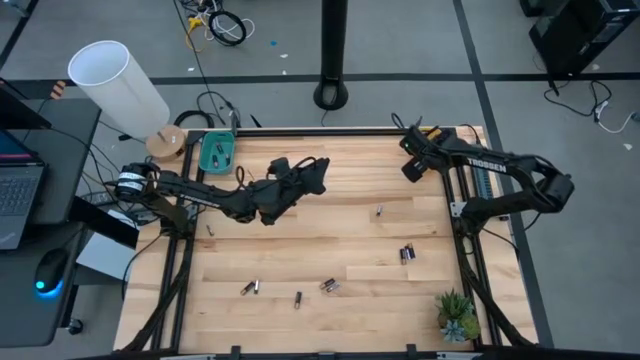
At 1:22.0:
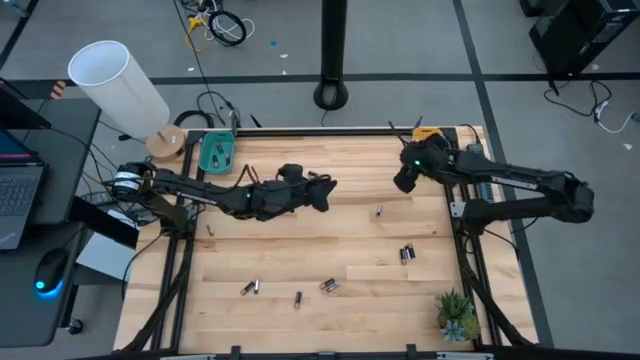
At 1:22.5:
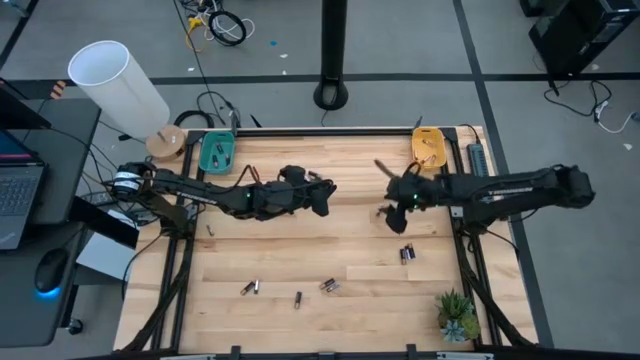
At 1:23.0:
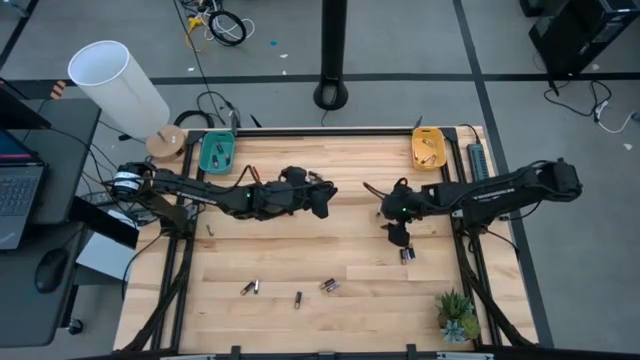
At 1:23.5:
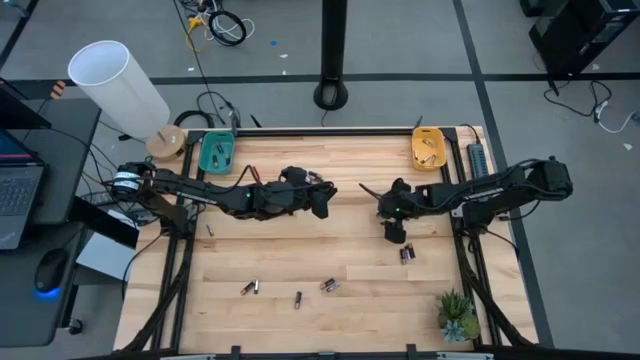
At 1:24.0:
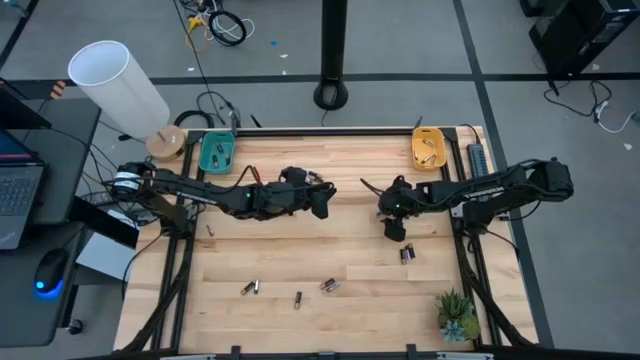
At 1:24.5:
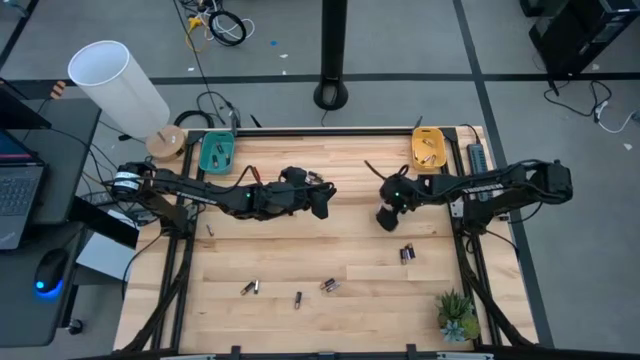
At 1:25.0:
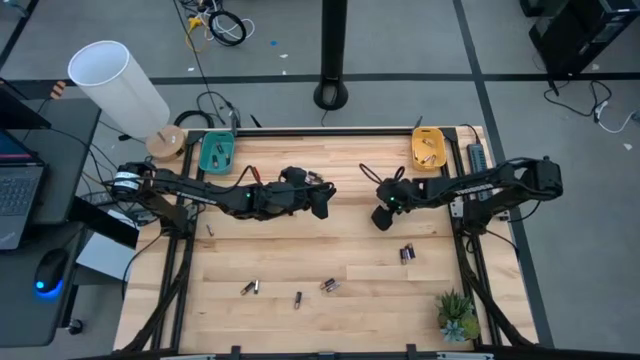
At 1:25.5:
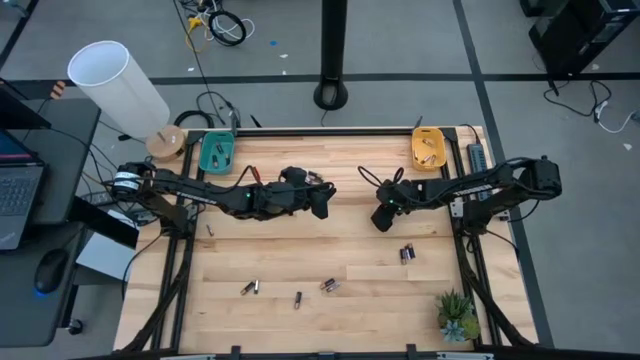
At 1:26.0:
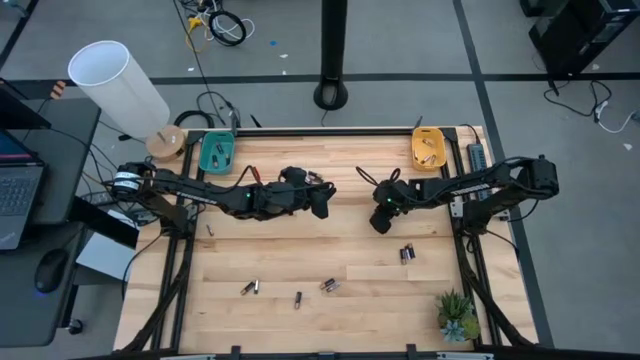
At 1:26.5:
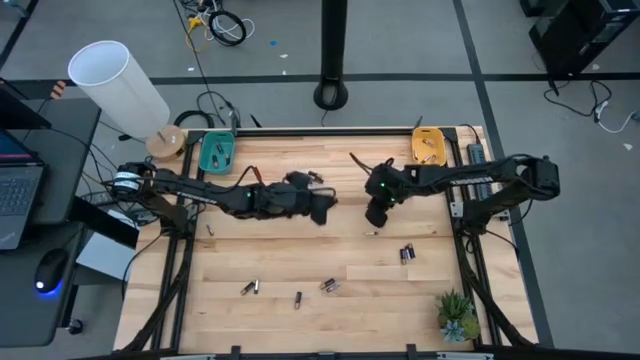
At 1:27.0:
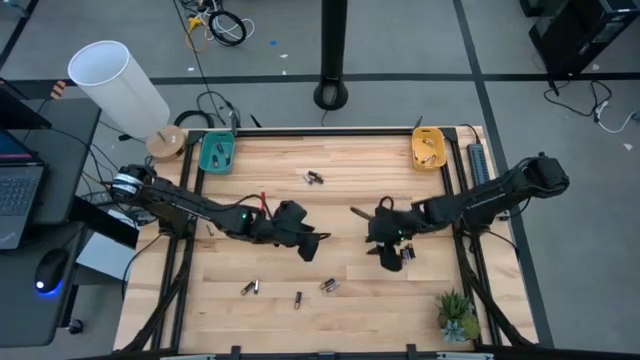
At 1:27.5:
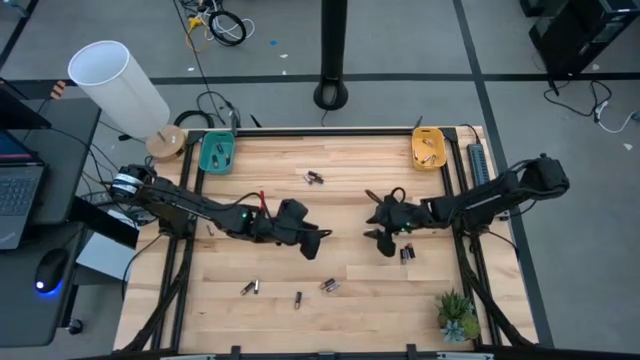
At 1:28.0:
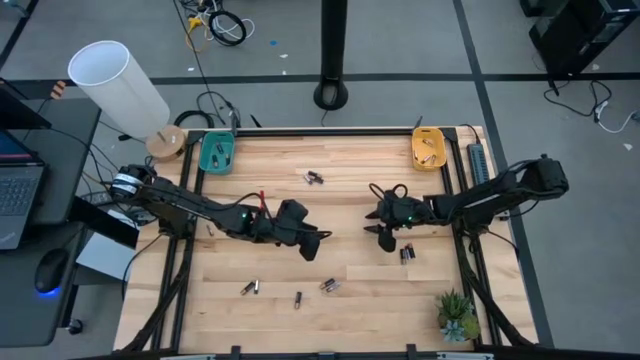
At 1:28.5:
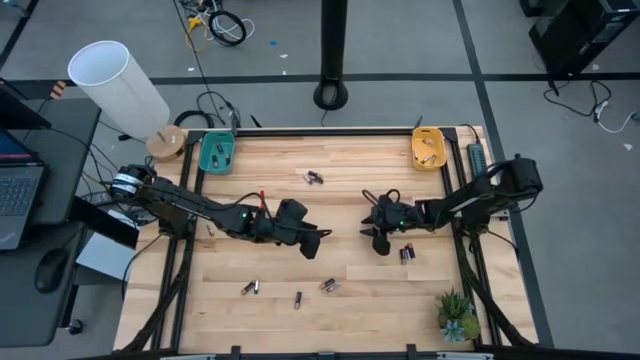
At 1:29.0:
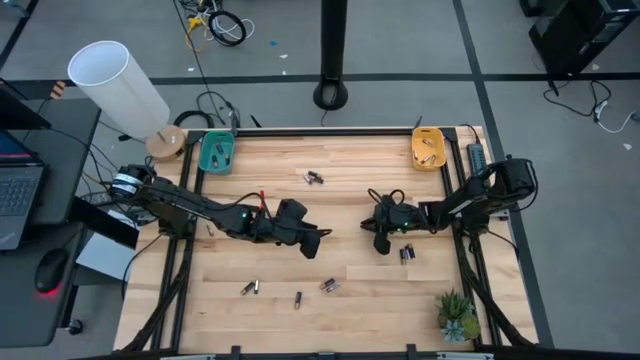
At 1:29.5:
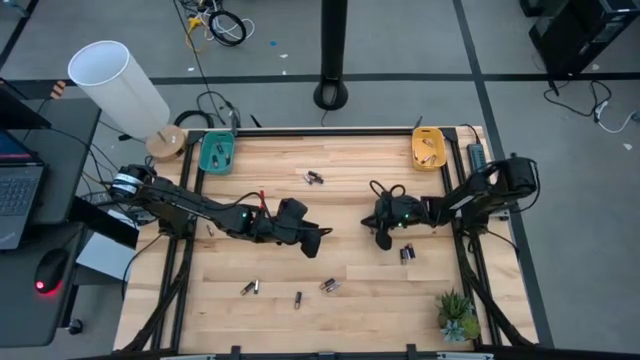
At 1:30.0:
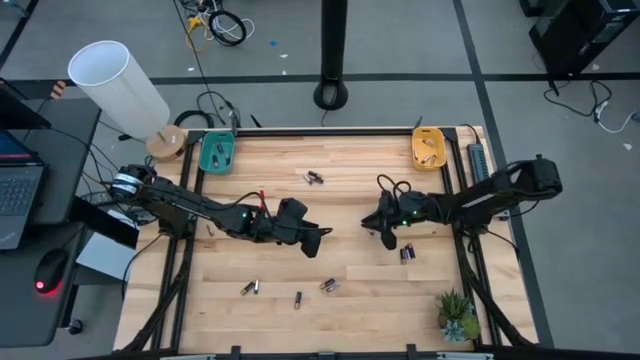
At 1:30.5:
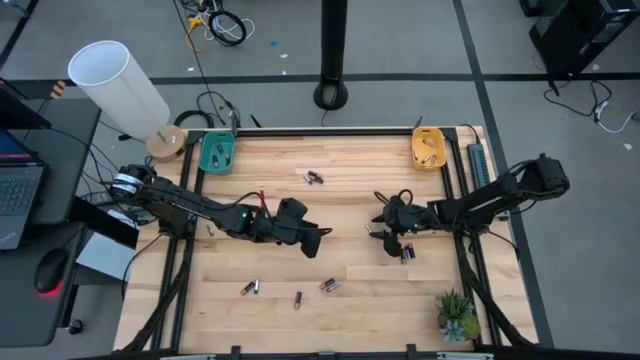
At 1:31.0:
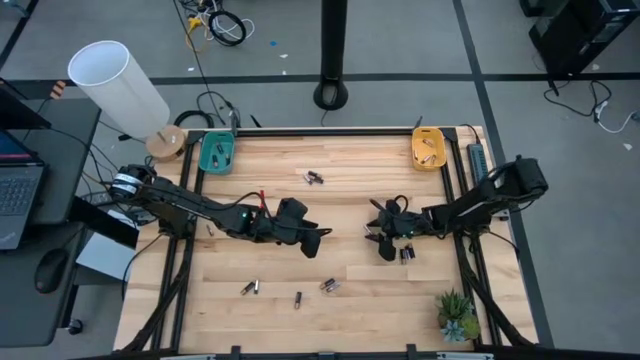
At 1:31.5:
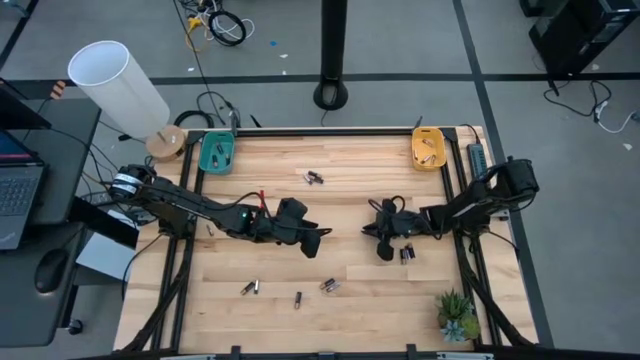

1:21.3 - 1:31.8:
Task: Sort batteries
Put the silver battery into the yellow bin

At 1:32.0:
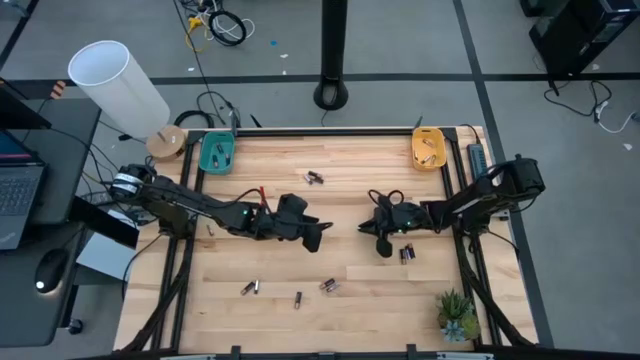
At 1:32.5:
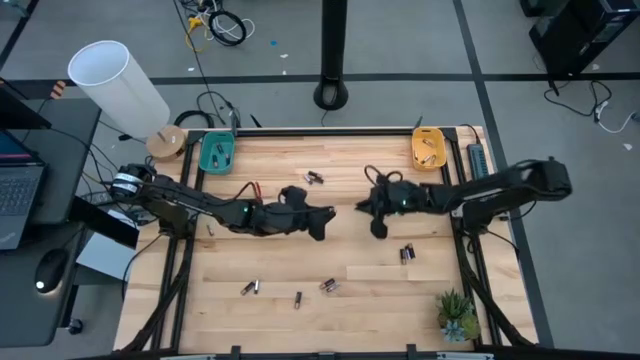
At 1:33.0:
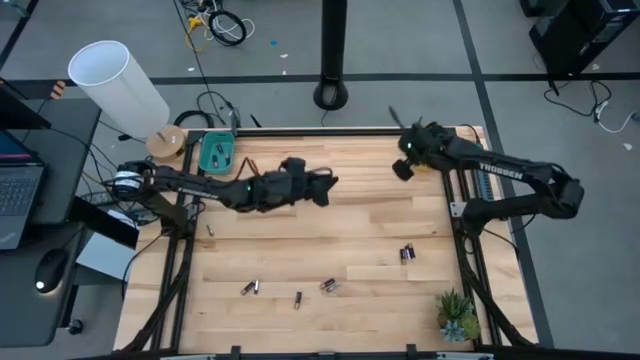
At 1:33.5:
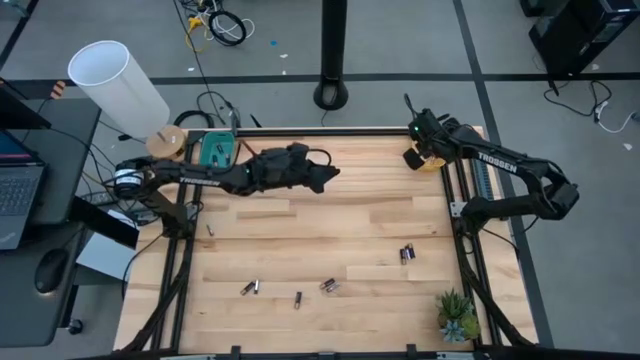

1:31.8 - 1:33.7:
Put the silver battery into the yellow bin

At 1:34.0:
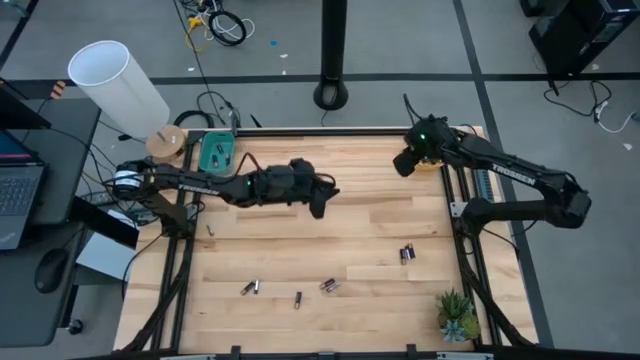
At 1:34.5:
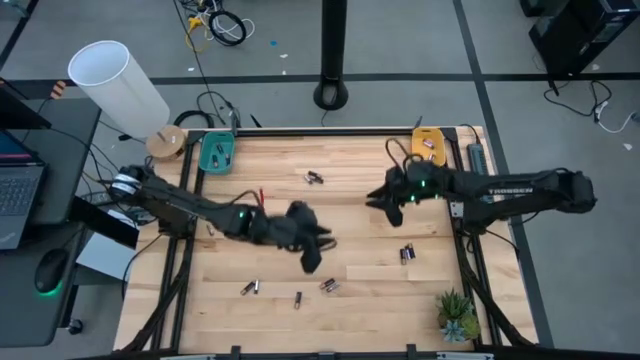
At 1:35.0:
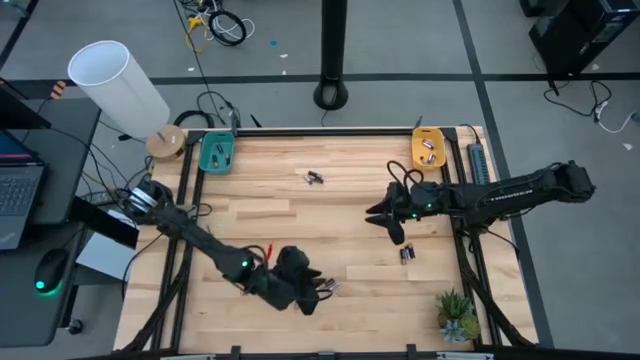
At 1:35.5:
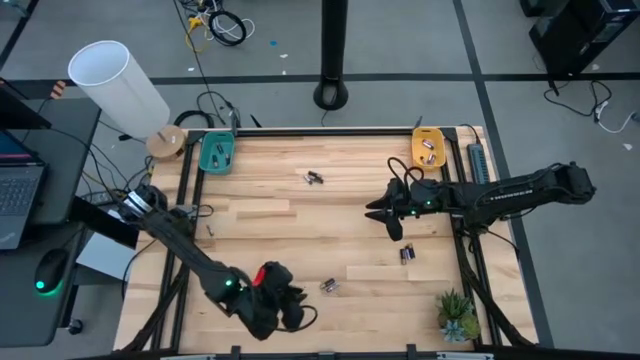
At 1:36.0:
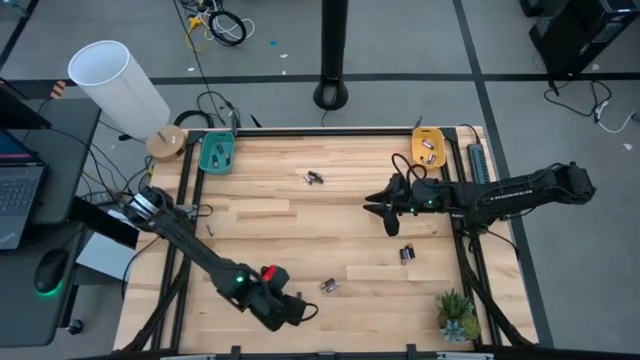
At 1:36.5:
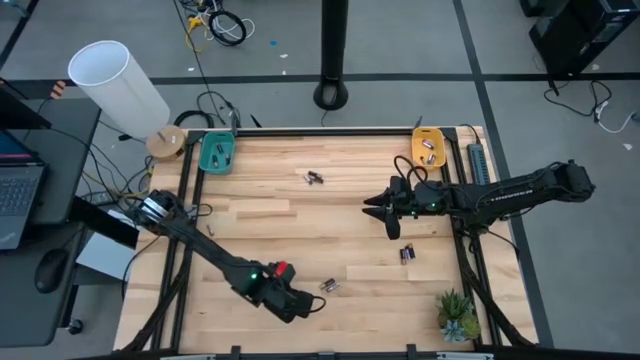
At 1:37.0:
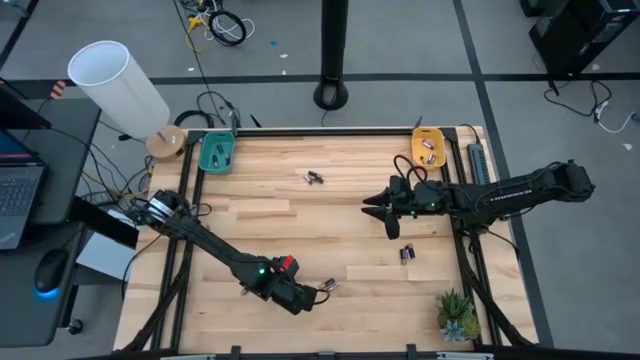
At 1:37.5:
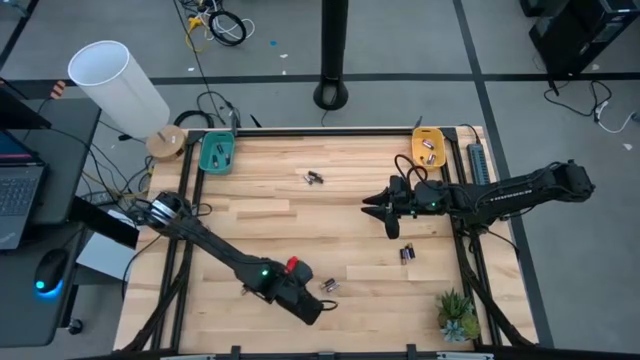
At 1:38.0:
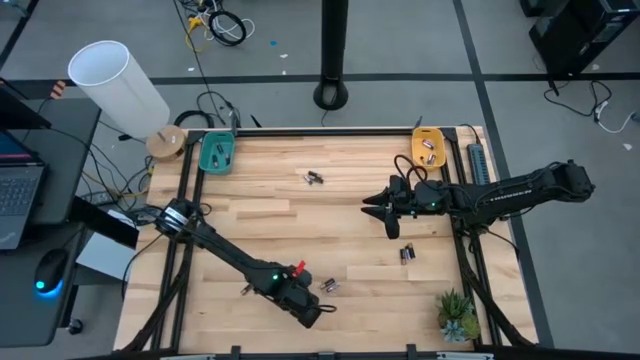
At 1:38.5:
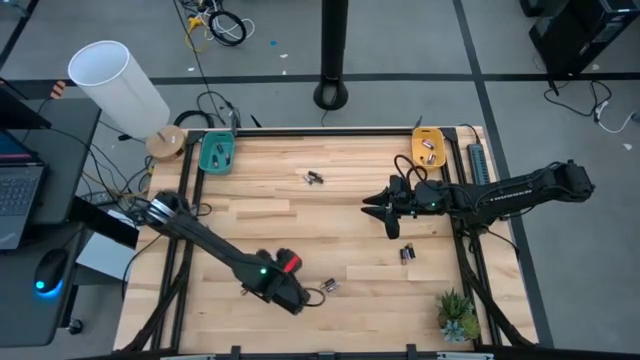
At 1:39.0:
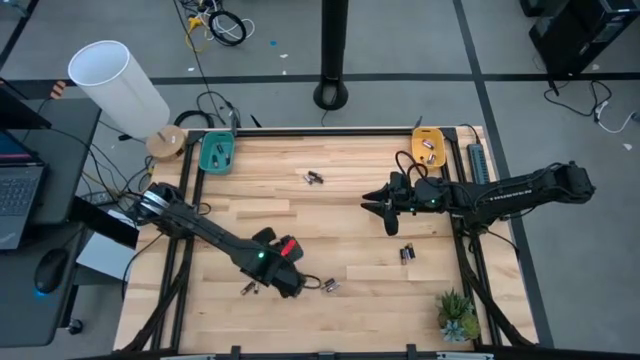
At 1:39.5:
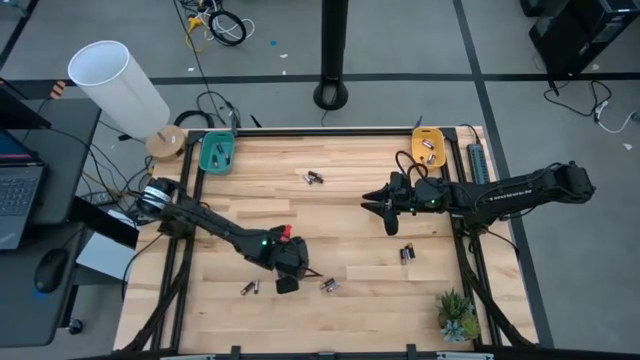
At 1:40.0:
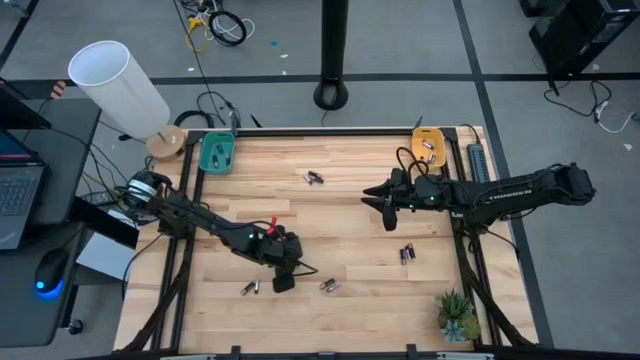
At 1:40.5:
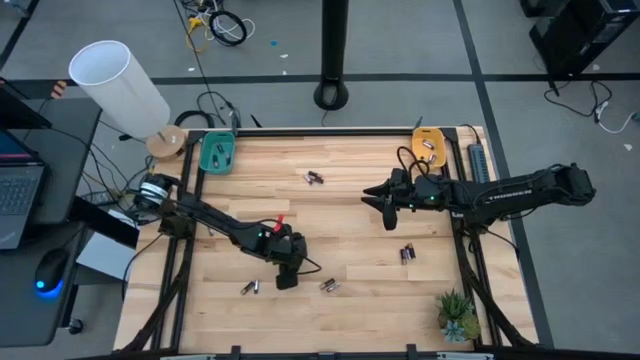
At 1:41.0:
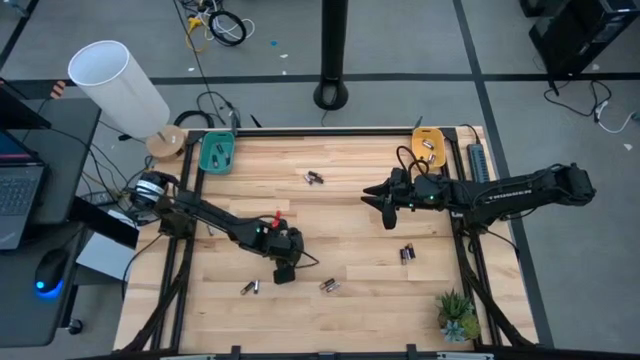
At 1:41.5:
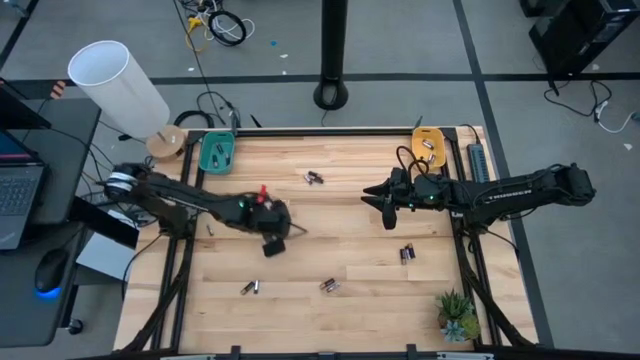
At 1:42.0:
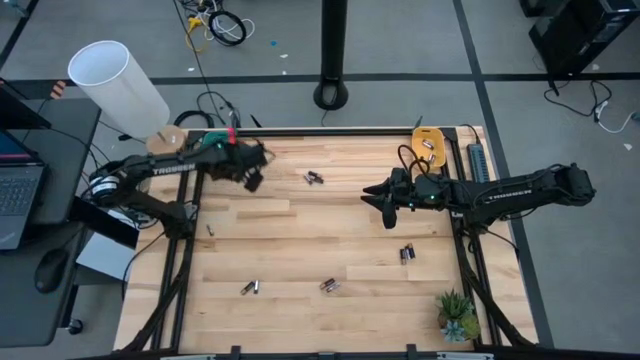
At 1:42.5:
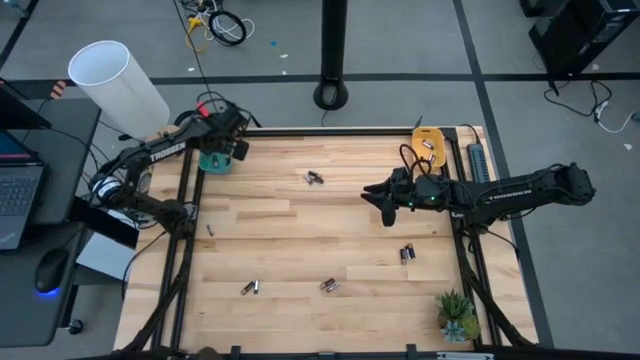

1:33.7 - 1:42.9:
Put the black battery into the blue bin
